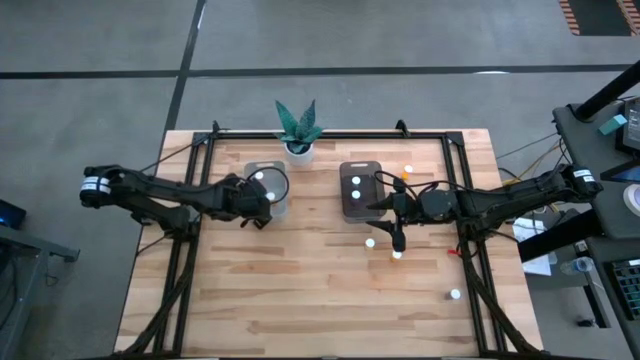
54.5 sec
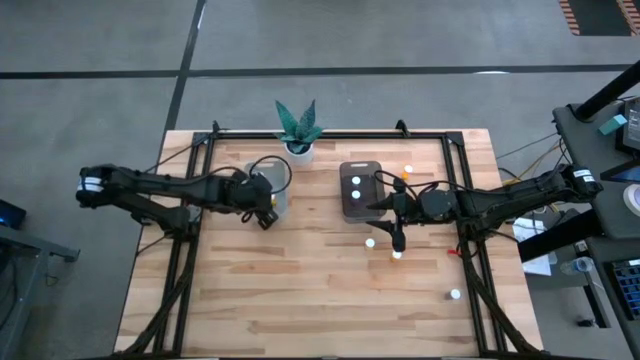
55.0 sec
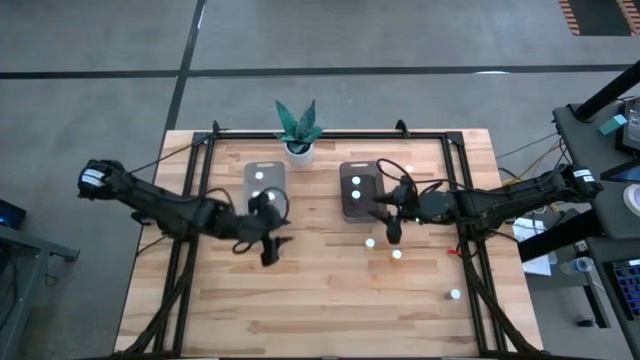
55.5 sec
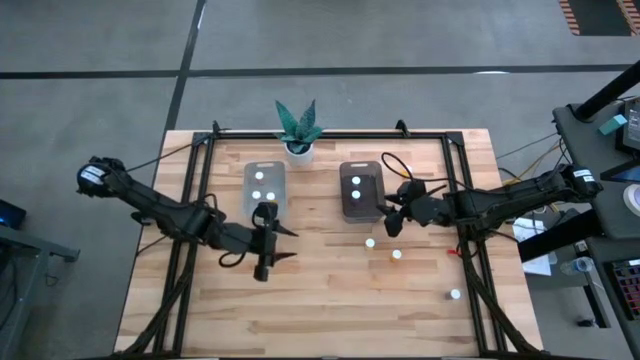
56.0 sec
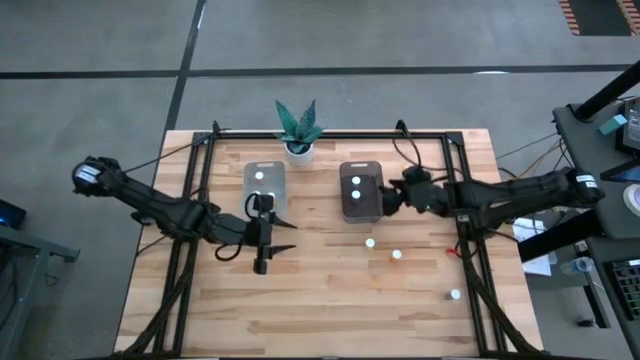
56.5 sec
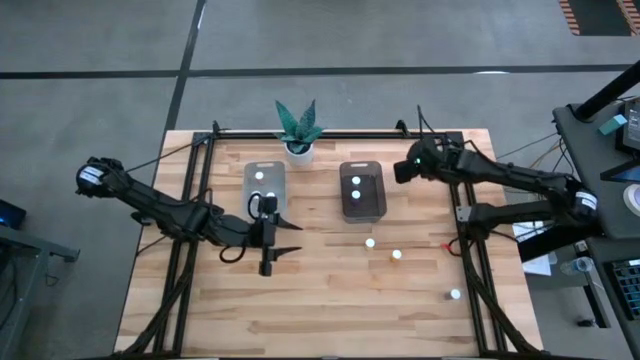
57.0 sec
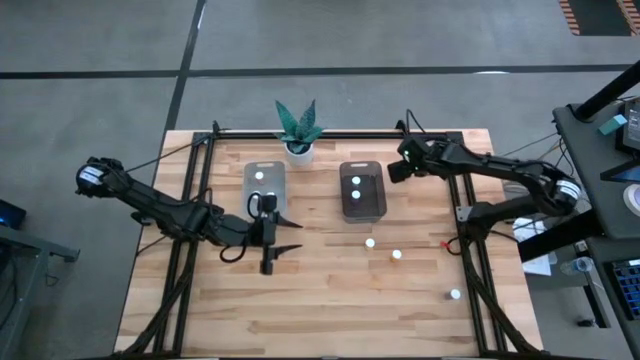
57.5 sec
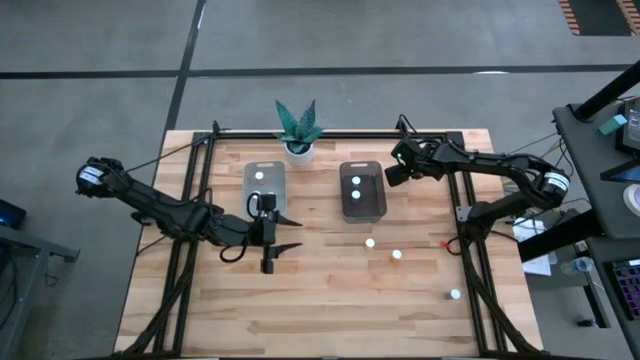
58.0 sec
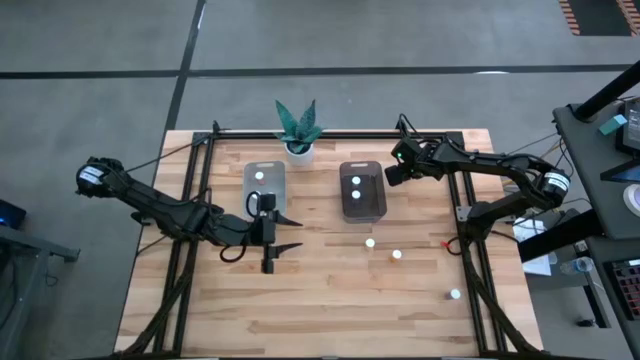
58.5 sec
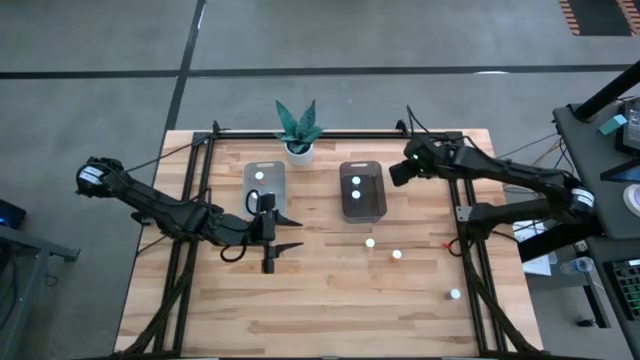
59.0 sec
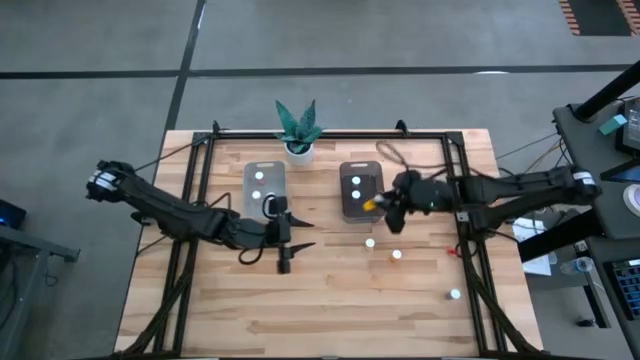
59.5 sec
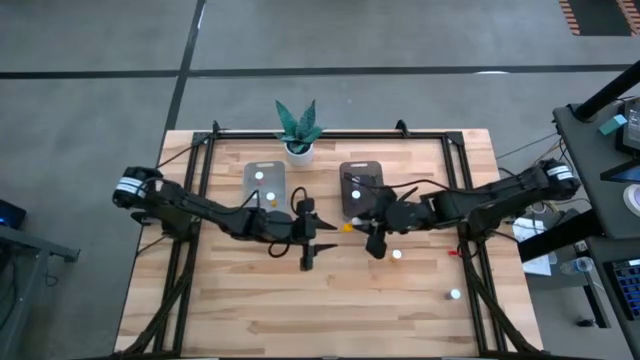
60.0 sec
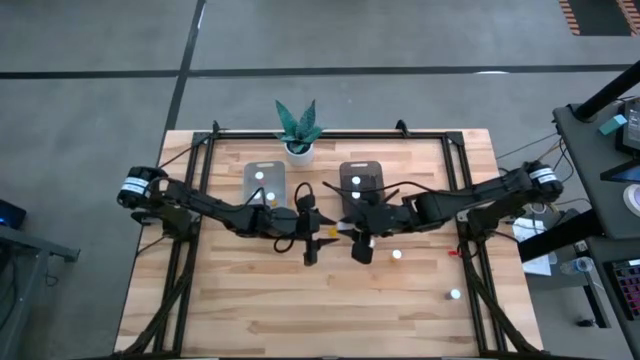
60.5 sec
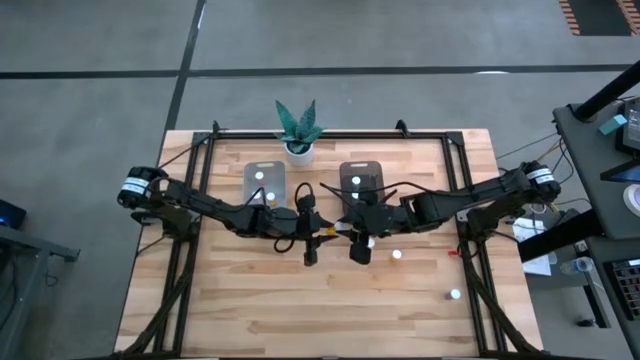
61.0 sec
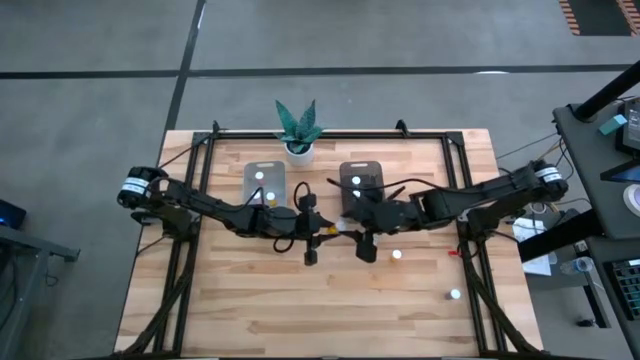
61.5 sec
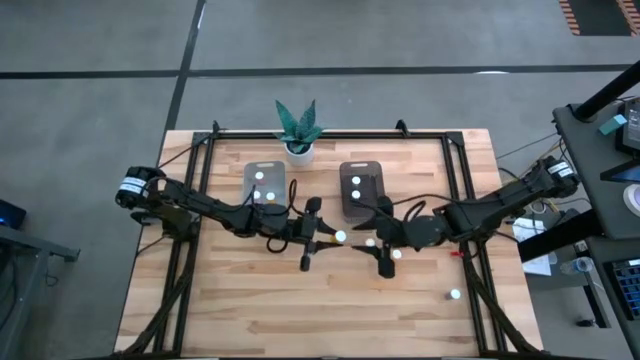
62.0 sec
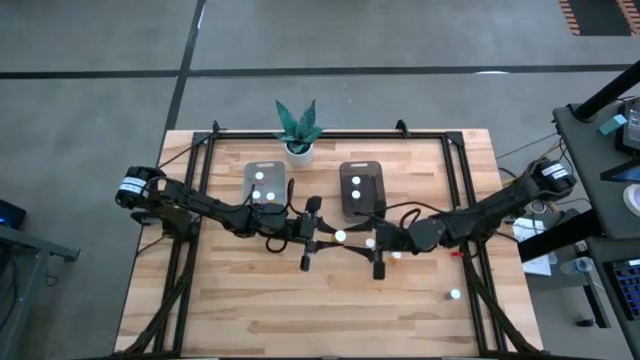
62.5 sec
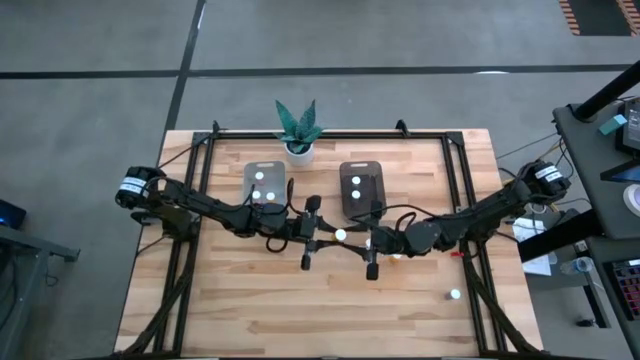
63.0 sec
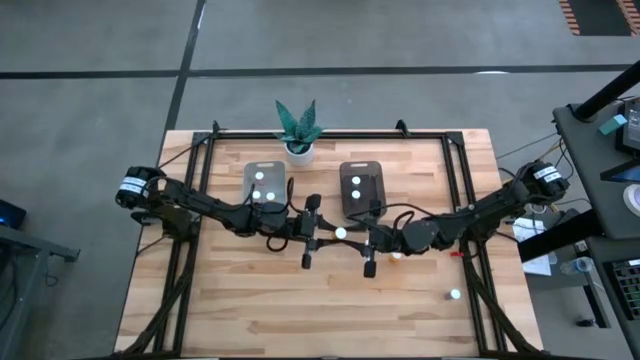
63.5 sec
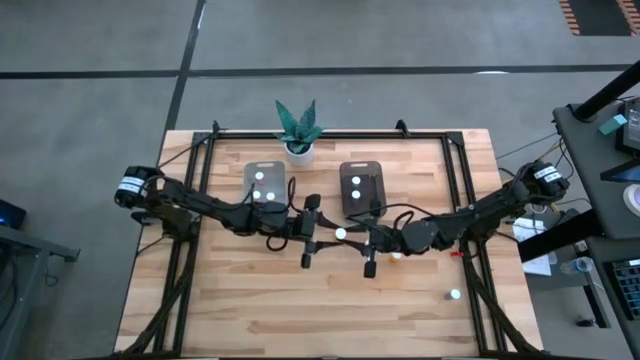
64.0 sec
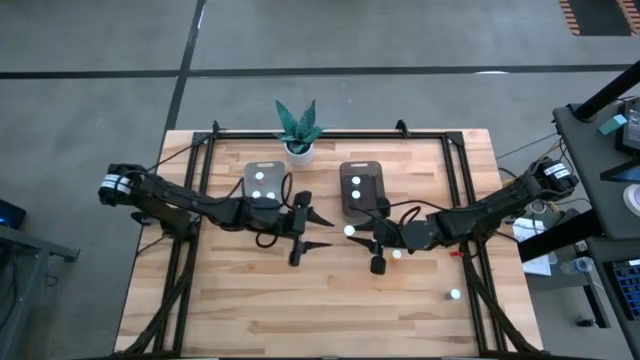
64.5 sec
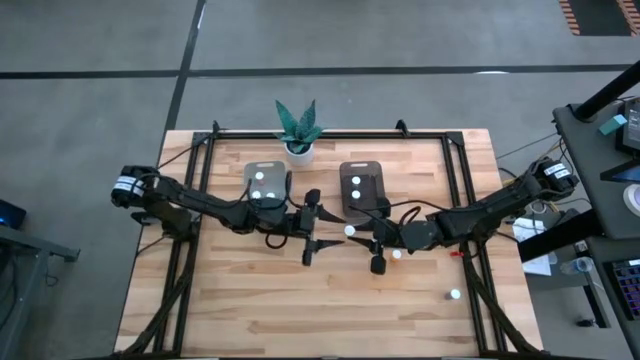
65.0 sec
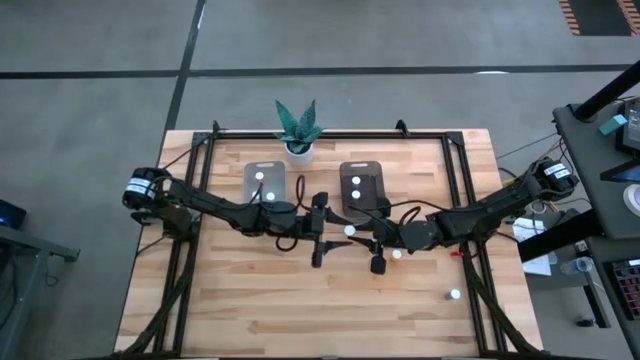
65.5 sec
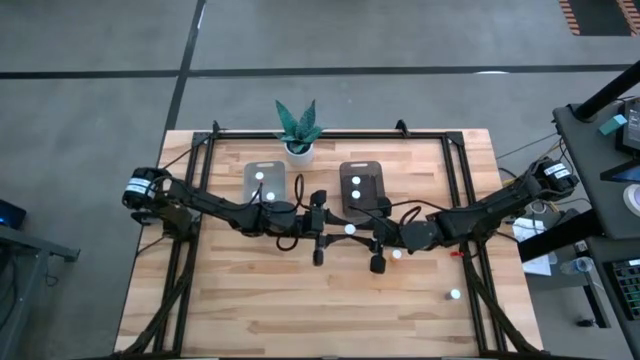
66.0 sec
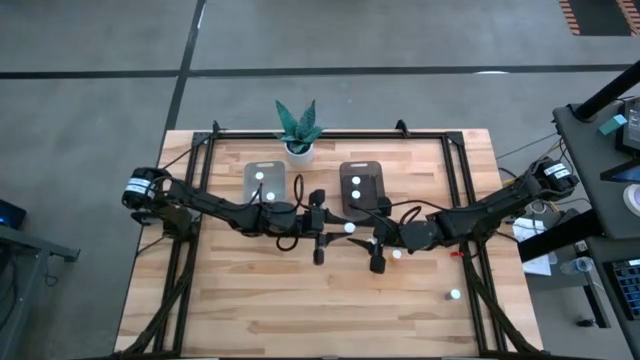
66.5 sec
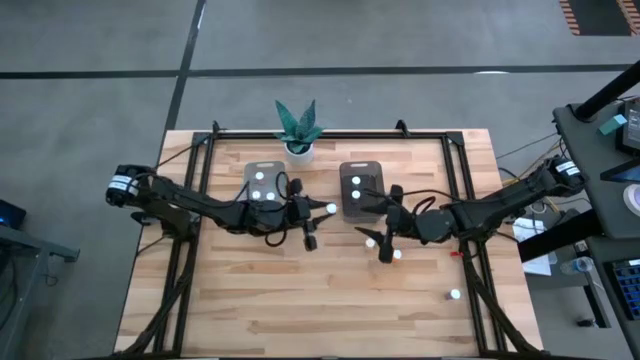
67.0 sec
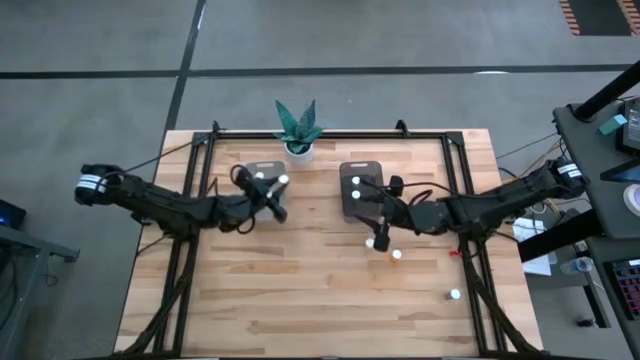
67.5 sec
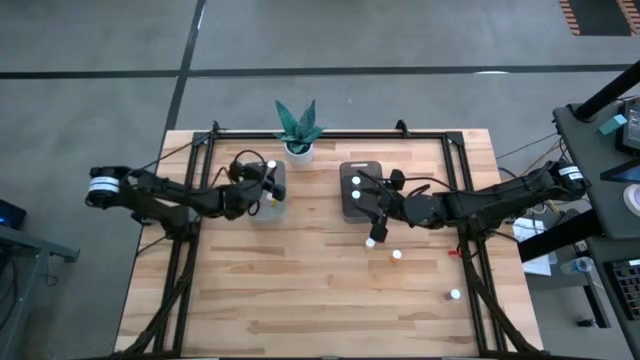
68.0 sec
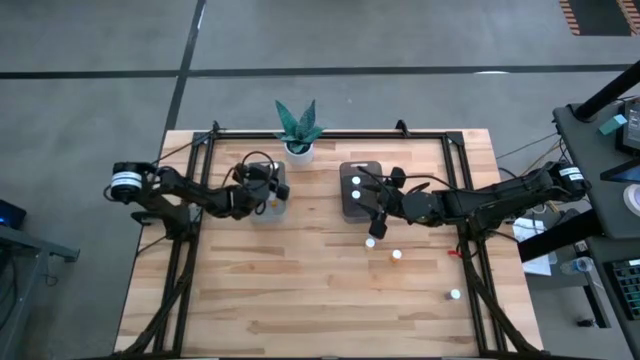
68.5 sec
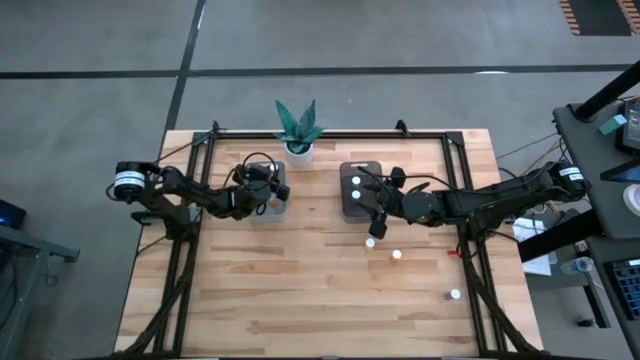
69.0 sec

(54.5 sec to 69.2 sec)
Task: Pick and place medicine bottles into bin by pill shape (circle, oval)
Put the top orange tablet bottle into the gray bin

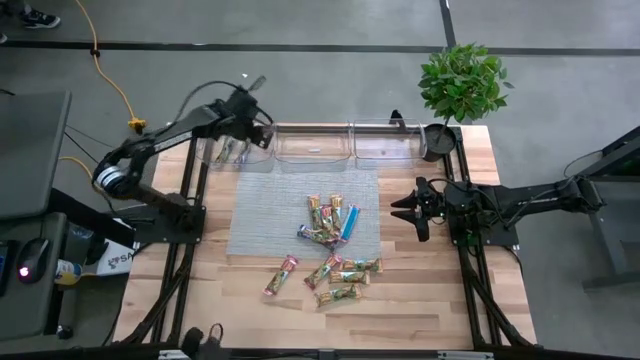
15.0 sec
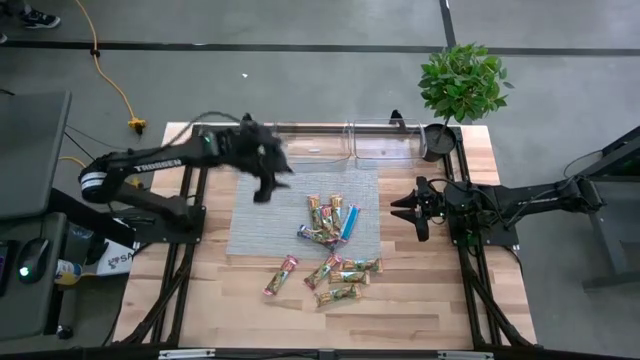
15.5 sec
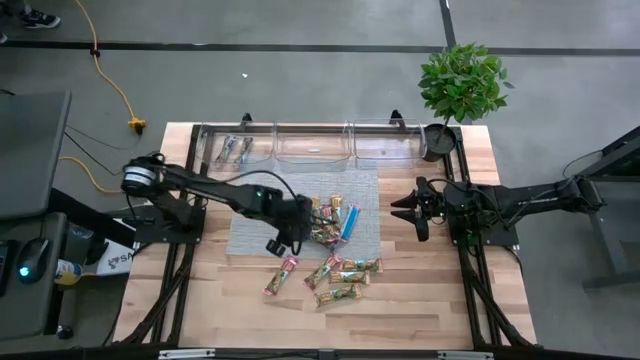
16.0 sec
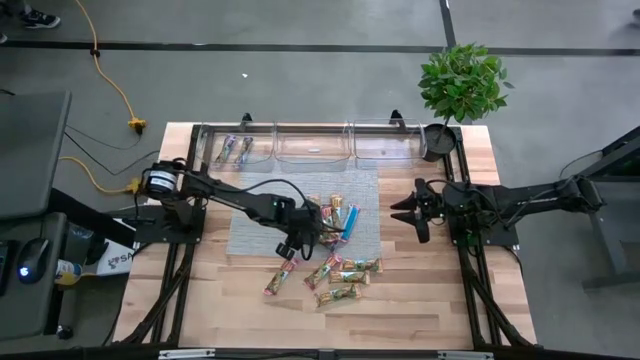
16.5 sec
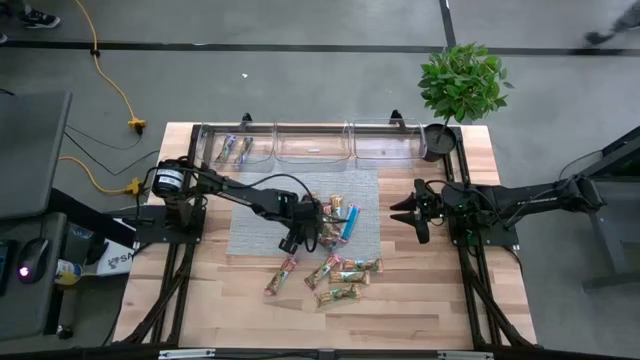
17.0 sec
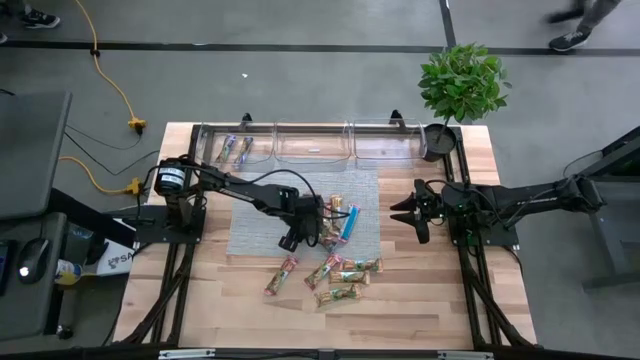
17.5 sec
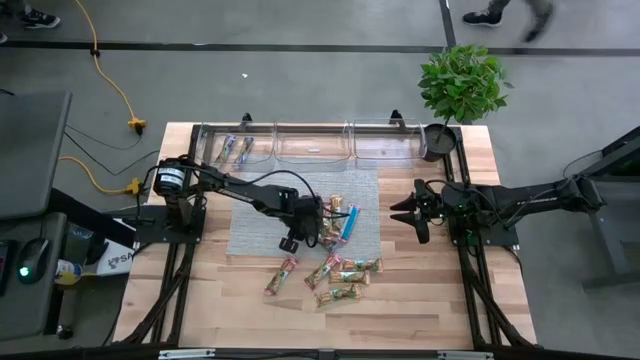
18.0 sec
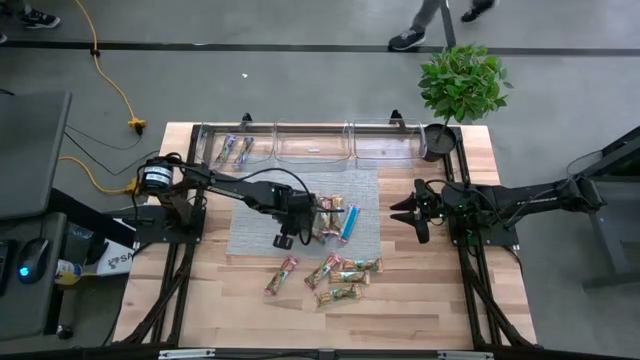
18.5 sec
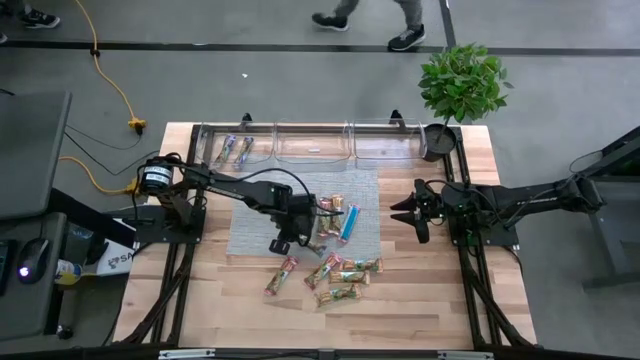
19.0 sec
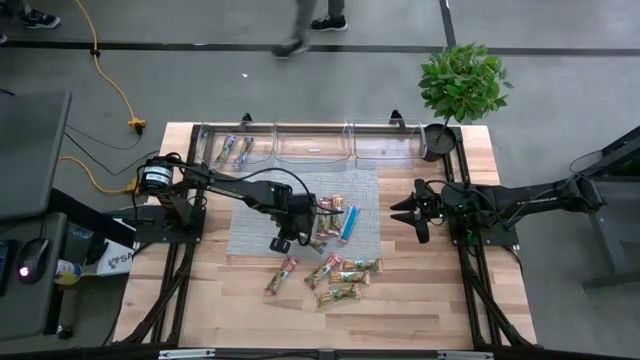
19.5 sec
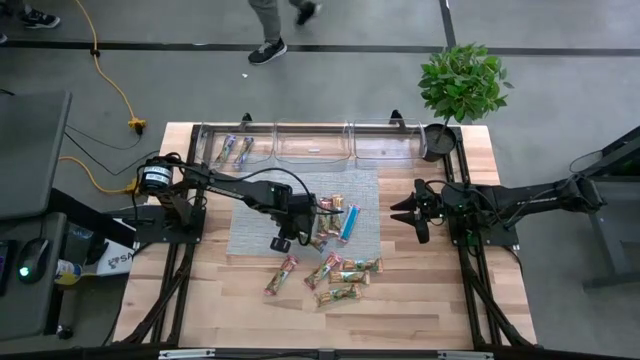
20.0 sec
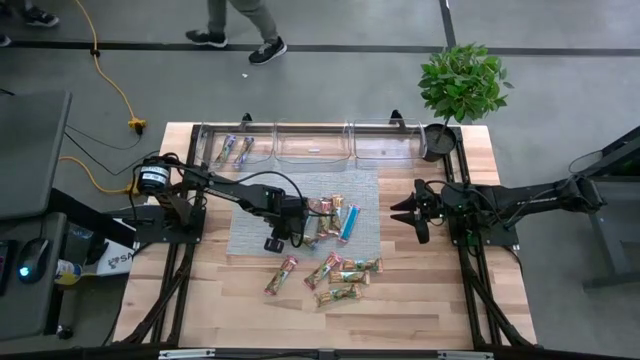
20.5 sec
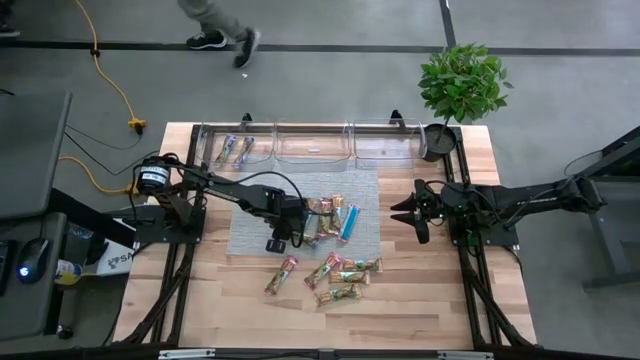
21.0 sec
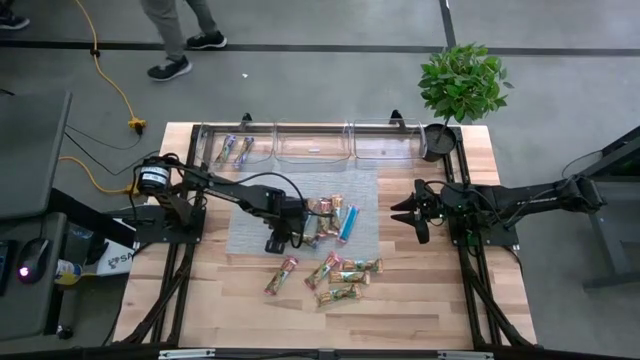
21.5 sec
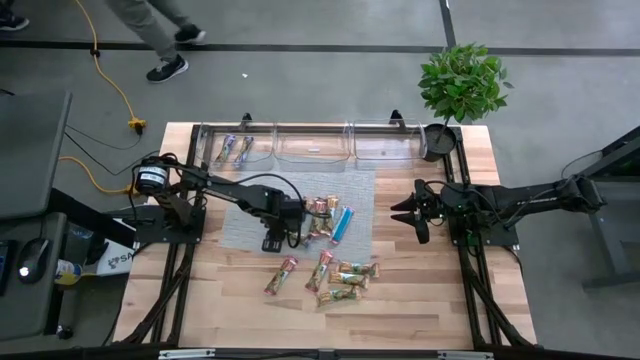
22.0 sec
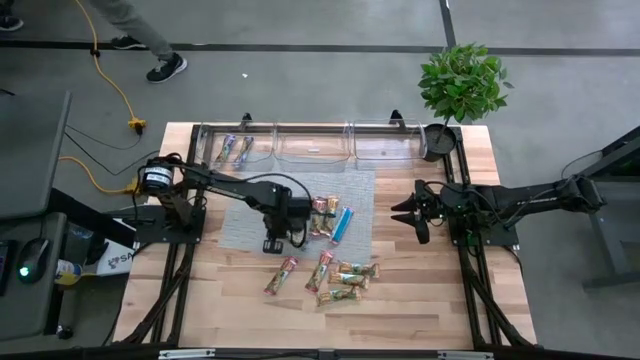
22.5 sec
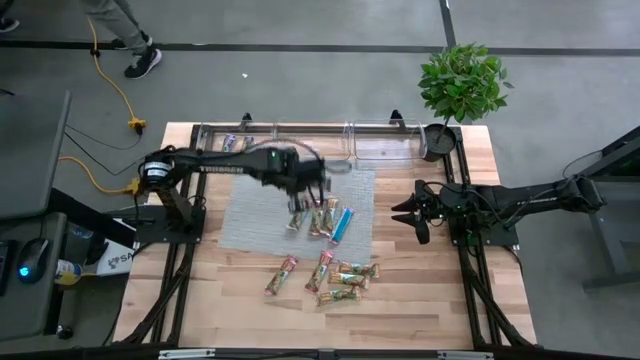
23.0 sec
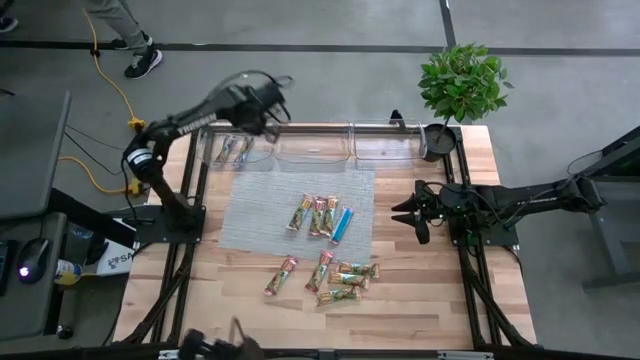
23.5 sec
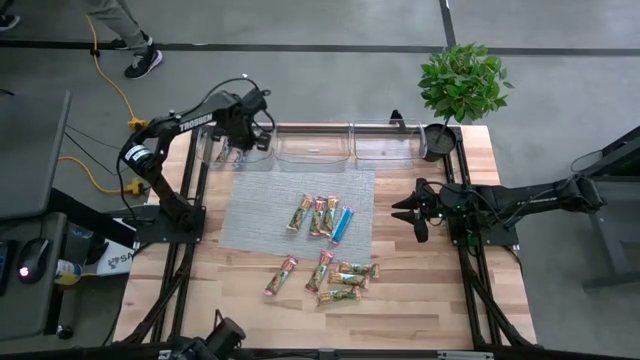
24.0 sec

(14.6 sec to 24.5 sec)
Task: Pick and place Granola Bars by type
Put the blue granola bar into the left transparent bin
